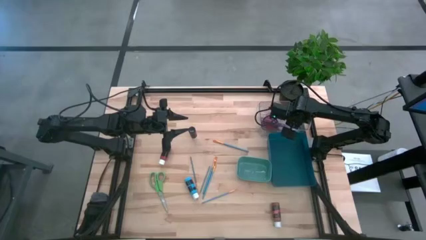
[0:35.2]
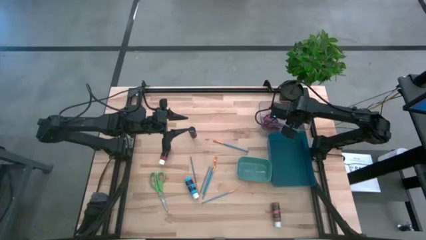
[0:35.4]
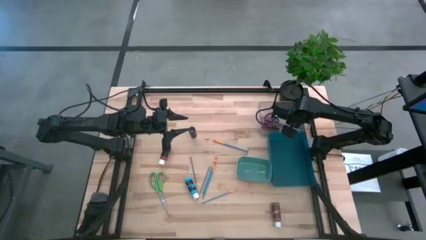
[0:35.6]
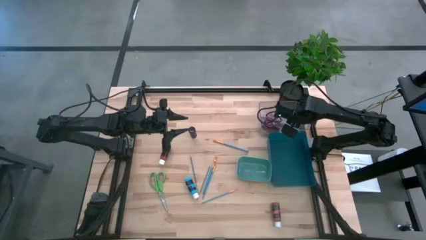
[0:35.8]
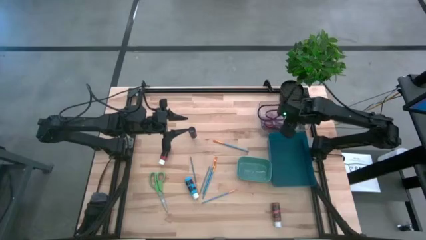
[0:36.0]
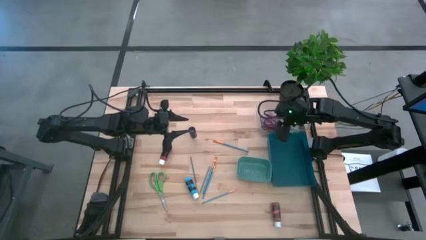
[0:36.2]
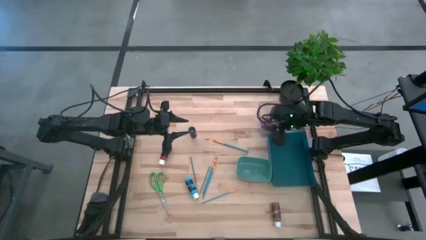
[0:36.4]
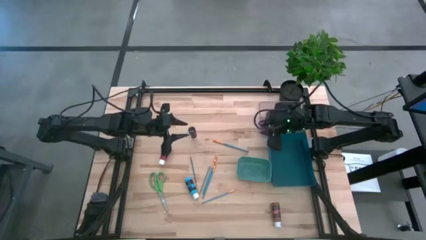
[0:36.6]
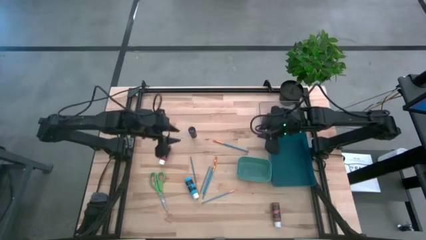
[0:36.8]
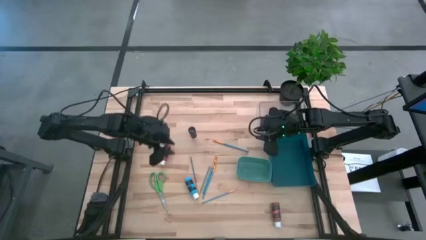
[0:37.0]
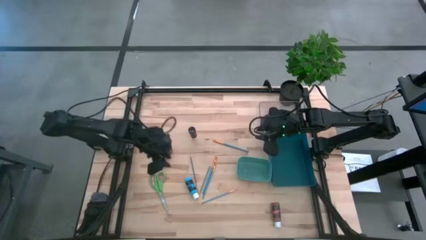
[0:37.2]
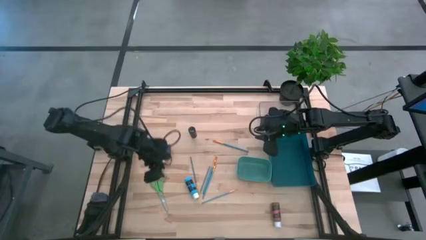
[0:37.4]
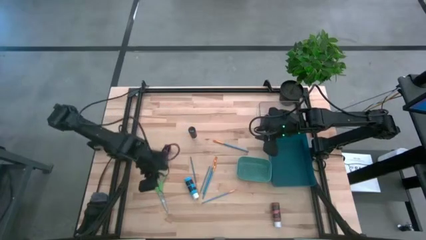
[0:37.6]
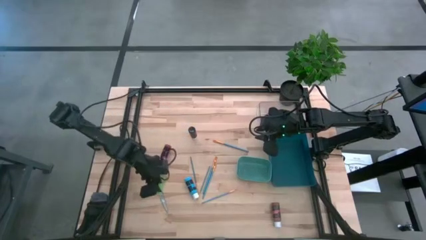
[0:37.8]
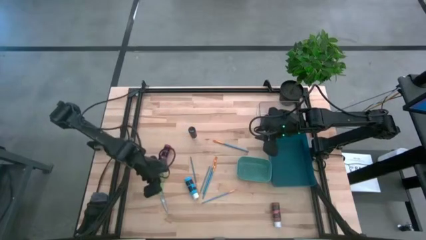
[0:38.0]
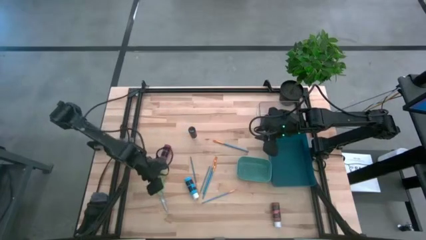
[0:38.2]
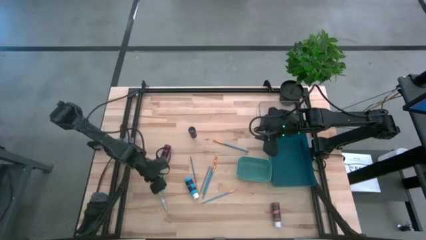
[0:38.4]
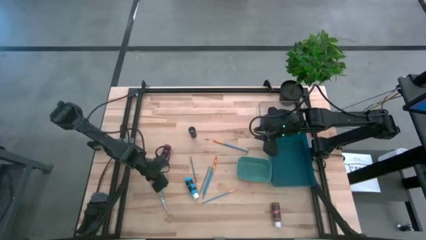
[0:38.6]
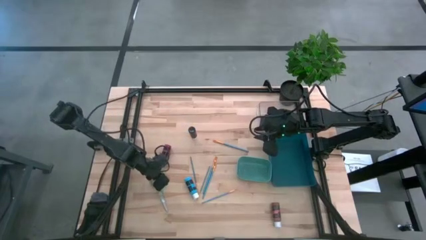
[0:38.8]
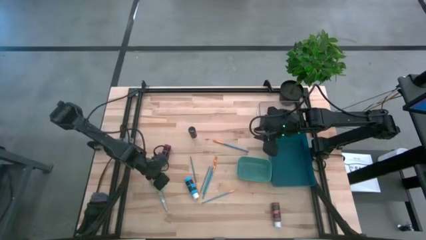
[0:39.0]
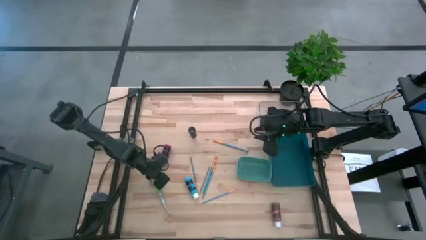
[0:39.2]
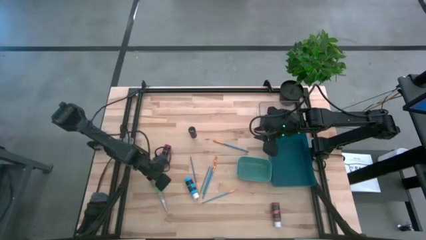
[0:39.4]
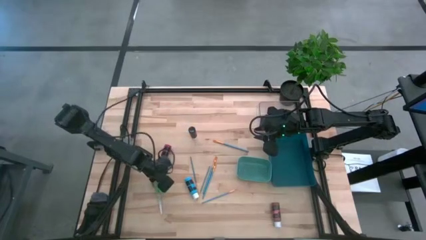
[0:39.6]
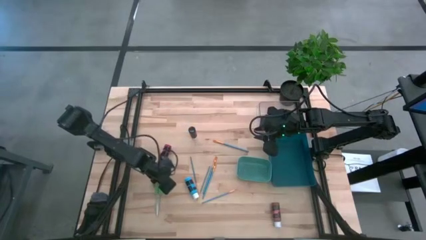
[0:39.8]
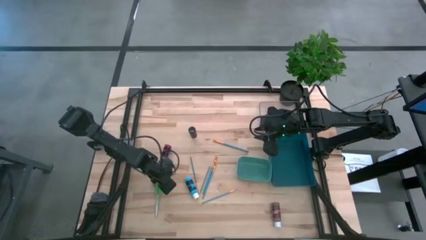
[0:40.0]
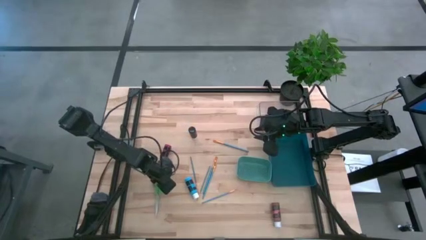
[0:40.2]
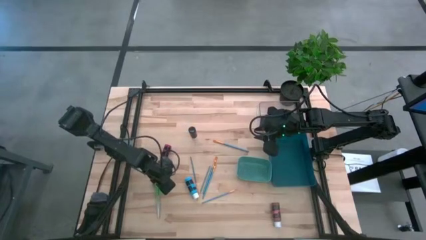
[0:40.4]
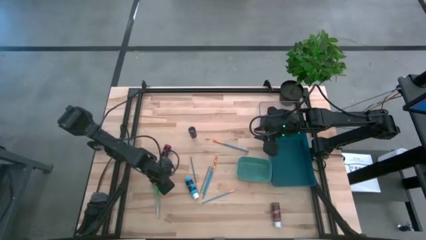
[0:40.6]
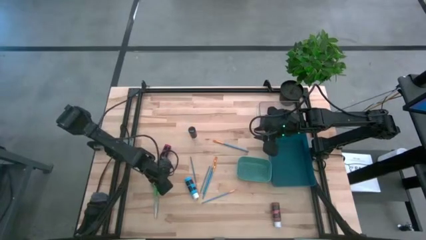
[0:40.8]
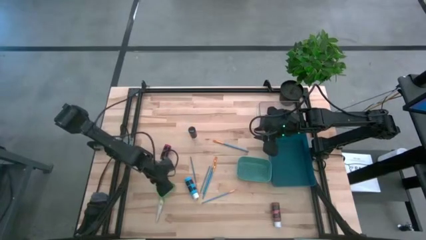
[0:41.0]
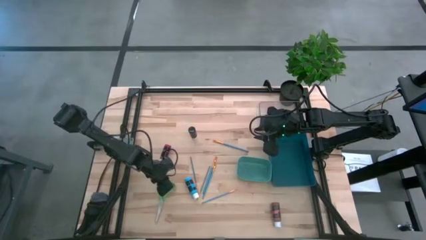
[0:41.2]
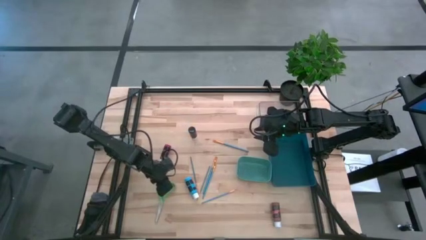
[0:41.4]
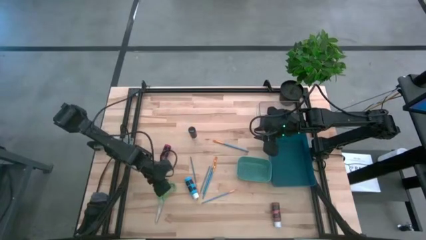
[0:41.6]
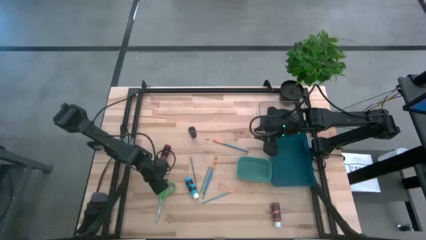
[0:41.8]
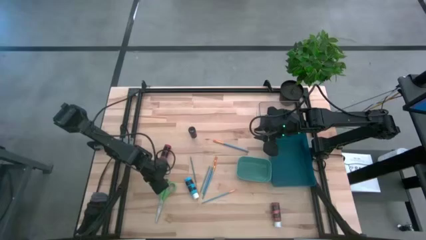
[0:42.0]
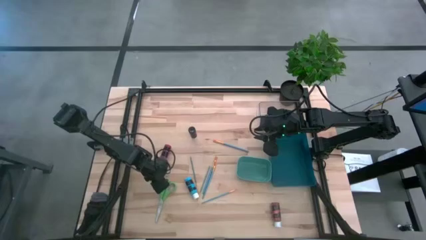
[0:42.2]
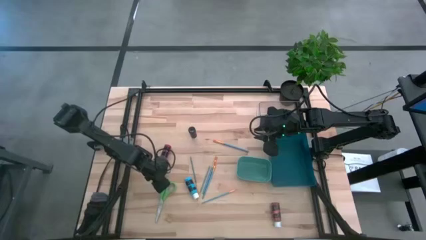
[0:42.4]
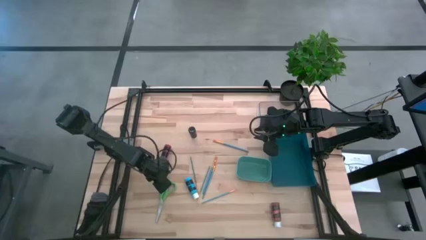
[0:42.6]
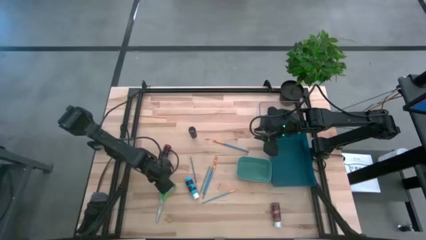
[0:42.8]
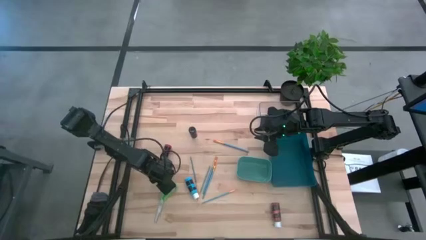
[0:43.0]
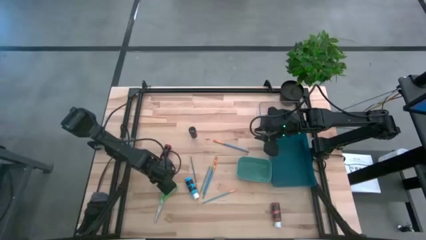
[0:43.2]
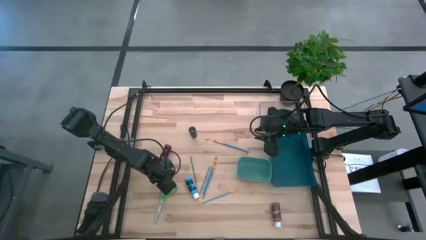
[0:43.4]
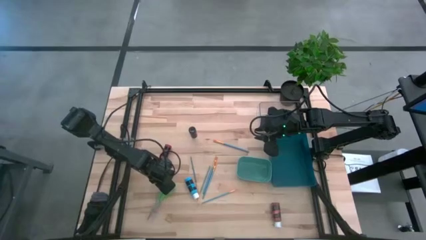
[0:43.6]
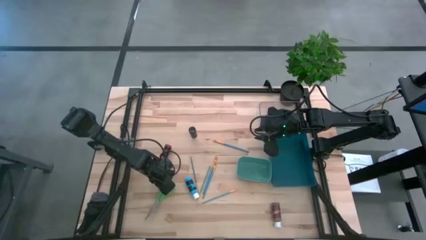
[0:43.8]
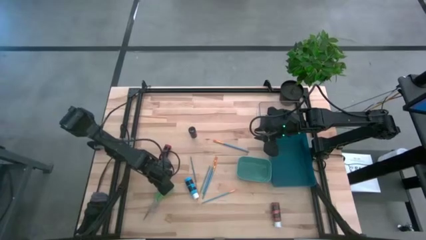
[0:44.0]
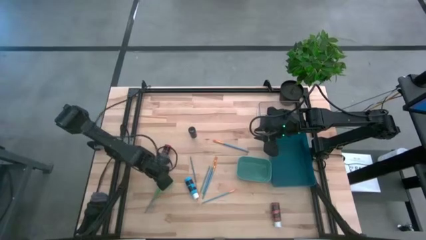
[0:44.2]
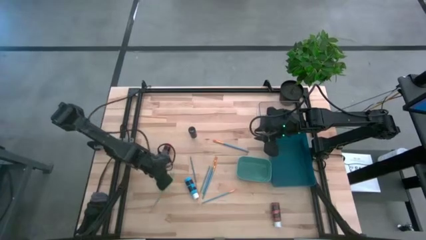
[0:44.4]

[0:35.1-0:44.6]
Task: Pick & Place Paint Supplies
Put the green scissors into the transparent bin

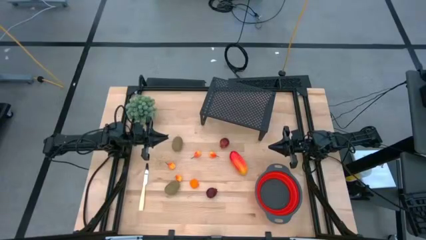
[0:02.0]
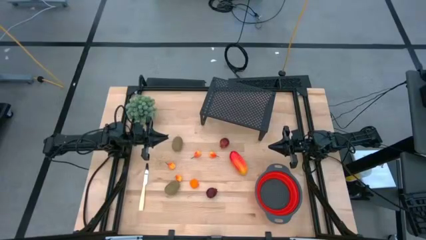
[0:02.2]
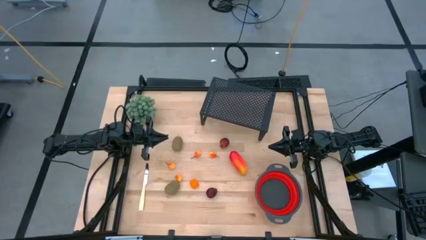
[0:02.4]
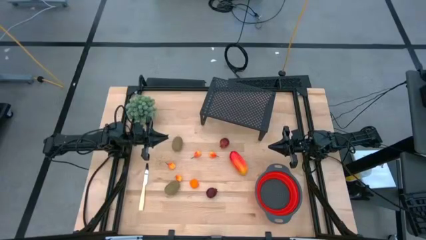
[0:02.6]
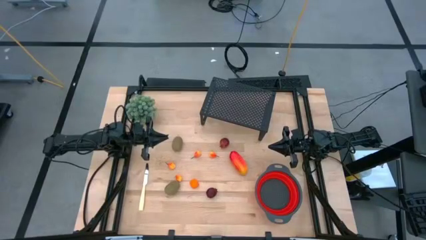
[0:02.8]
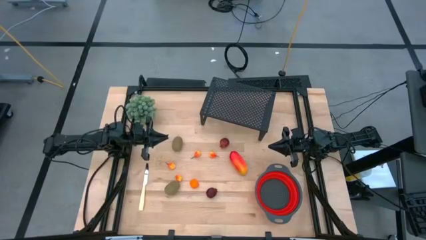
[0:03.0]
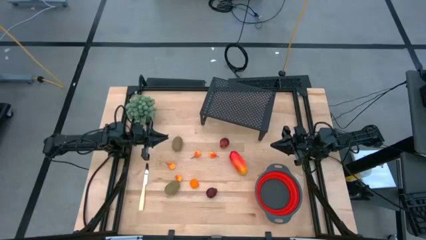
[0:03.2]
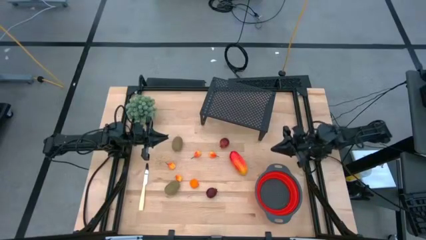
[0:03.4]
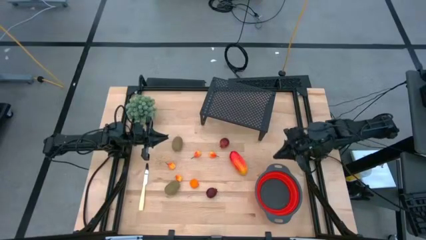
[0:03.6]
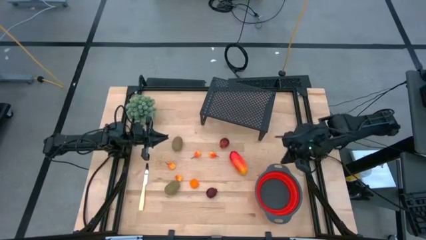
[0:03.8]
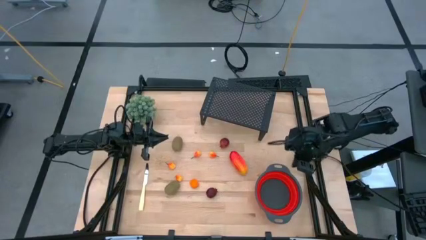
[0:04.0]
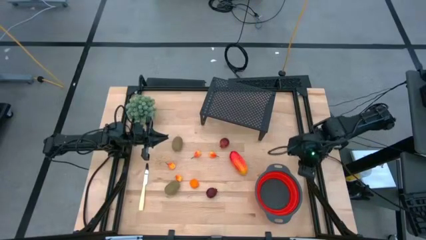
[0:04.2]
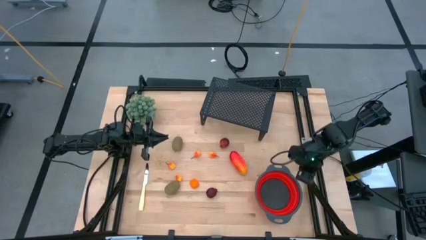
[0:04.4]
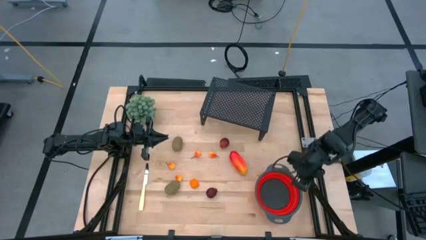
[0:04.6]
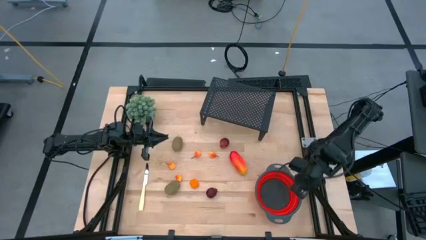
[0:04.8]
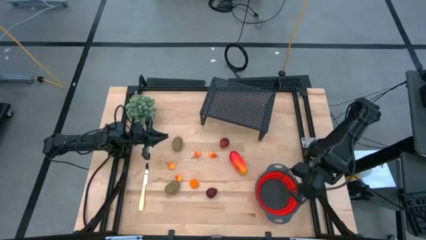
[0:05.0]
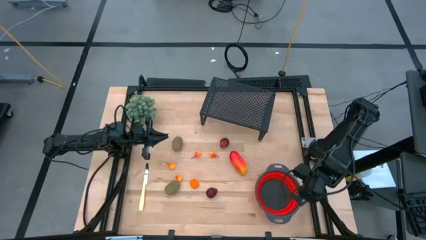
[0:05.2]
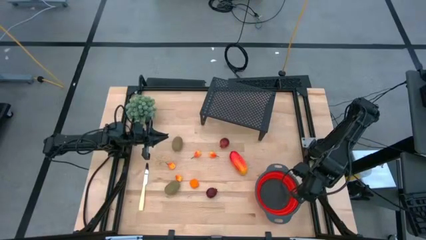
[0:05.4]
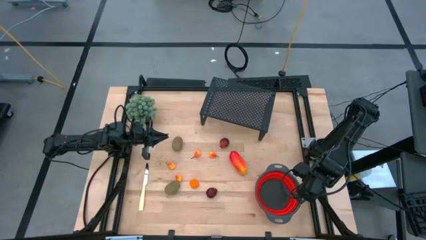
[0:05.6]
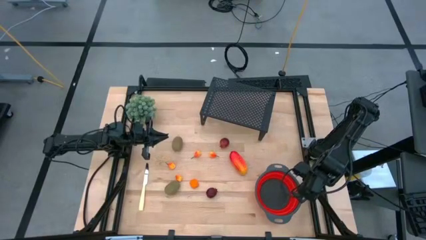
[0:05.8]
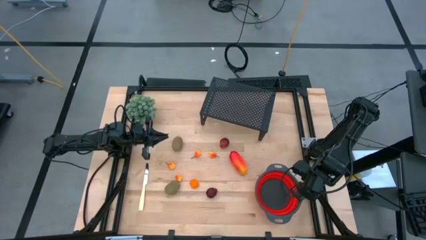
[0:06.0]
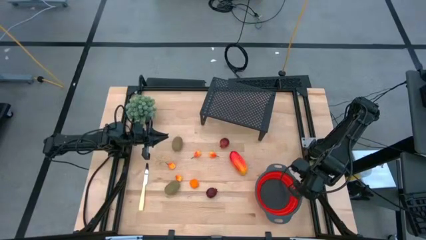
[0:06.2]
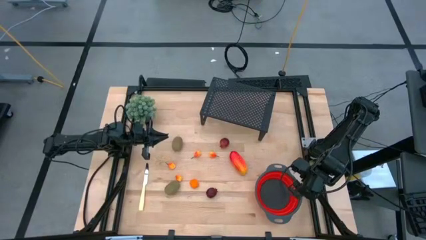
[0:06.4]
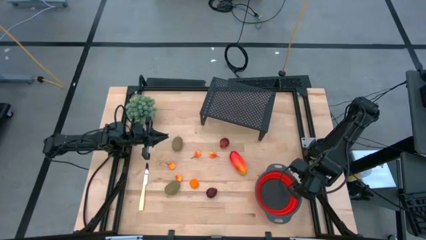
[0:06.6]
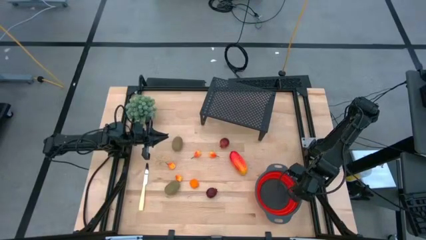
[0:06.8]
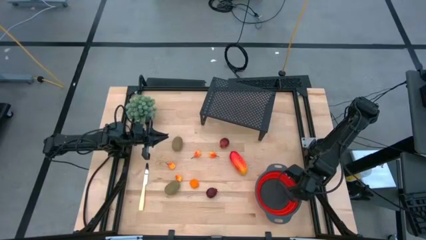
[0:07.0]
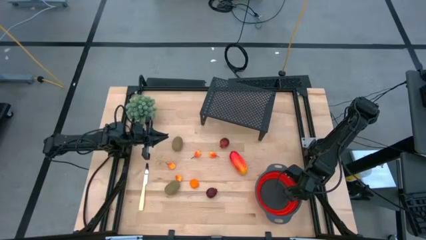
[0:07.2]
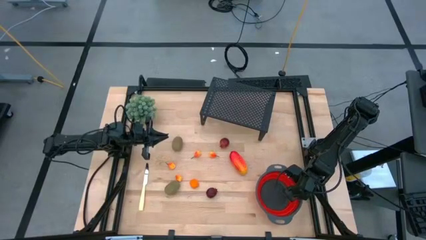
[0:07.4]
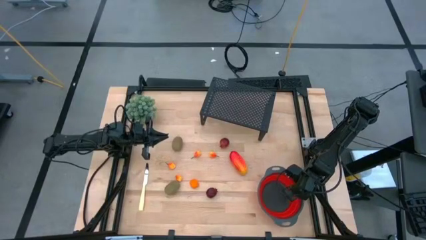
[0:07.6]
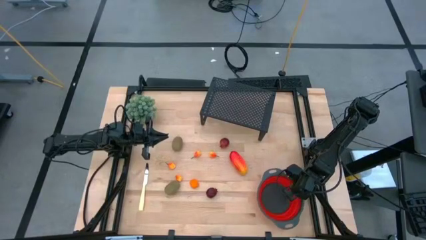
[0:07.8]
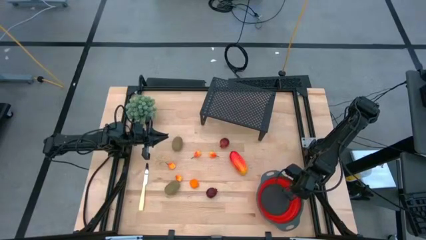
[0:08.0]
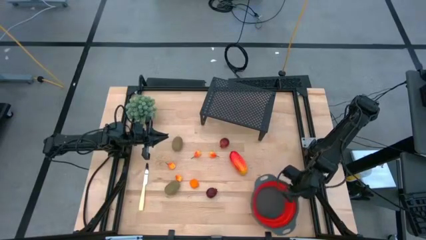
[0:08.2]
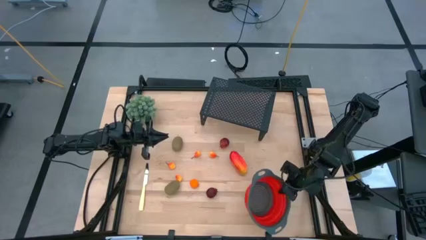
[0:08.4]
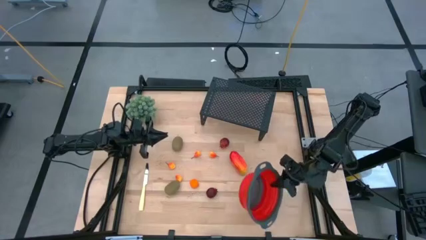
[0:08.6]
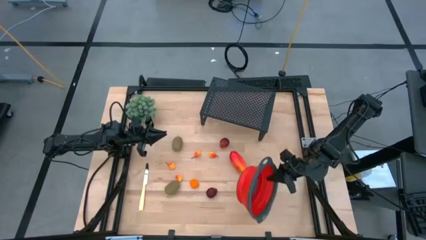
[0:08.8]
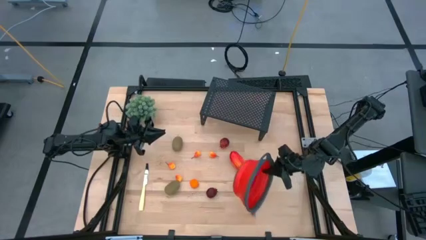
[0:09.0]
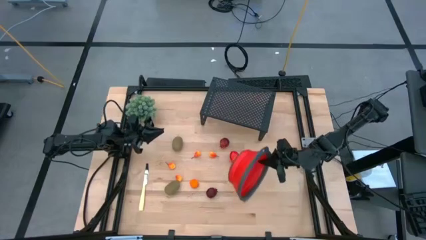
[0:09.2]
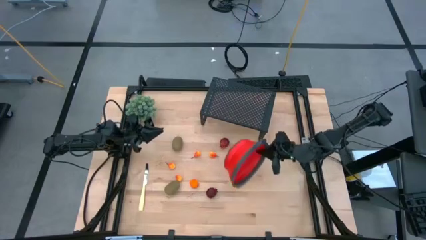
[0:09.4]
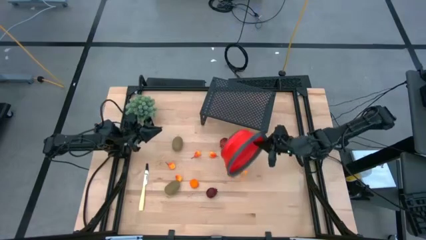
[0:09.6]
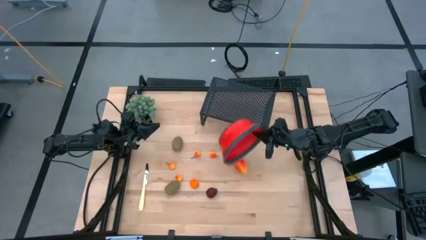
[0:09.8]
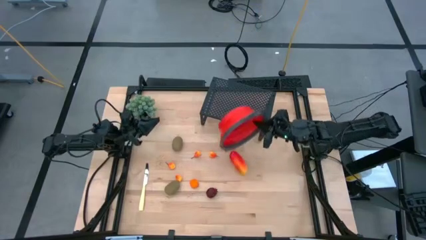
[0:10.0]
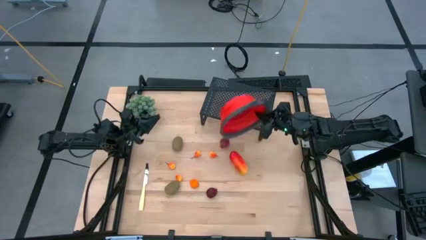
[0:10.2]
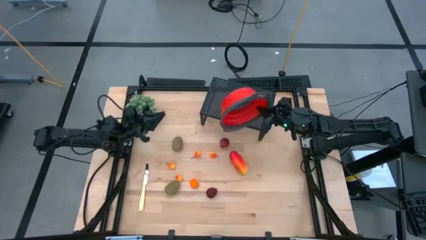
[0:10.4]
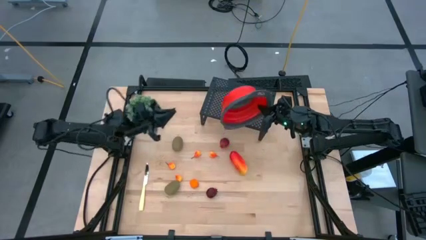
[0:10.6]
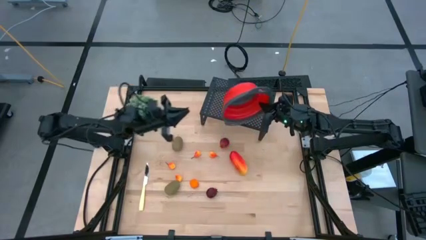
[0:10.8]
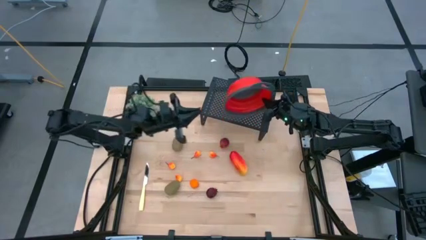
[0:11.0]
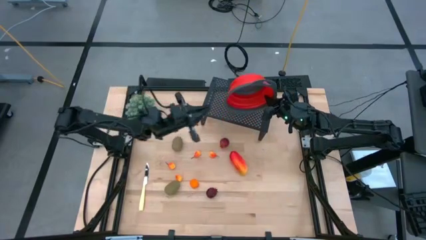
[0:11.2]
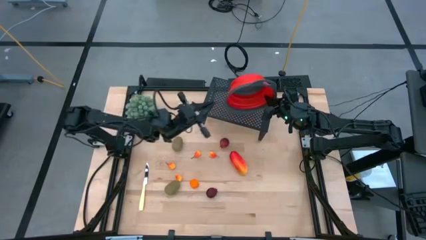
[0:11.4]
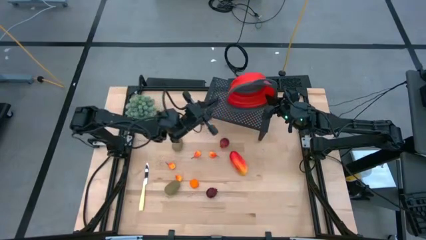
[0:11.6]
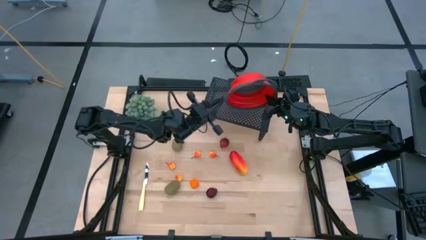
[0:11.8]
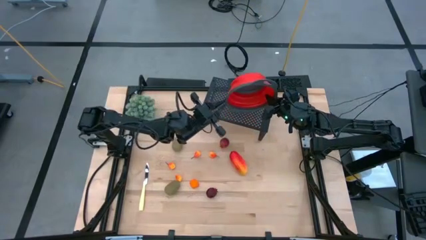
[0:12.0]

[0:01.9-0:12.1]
Task: Pick & Place Fruit
Put the red strainer bowl on the shelf
